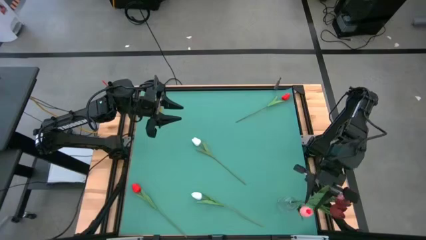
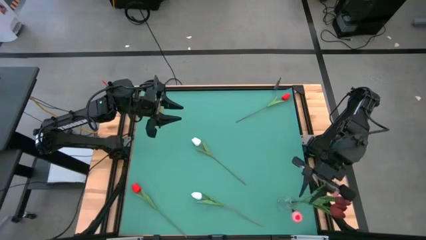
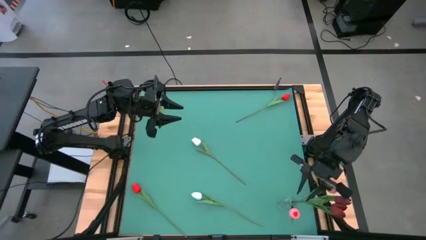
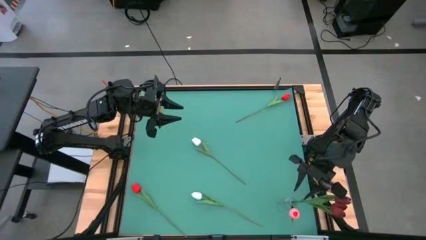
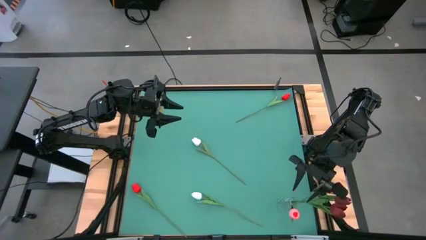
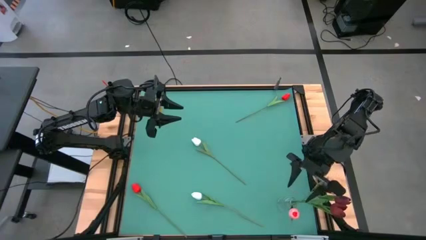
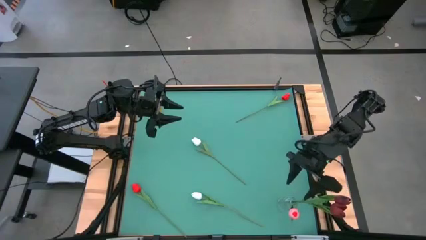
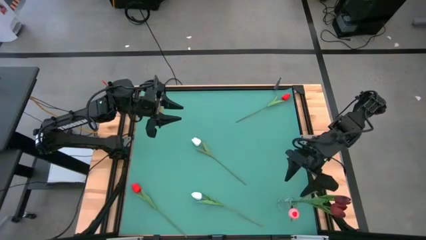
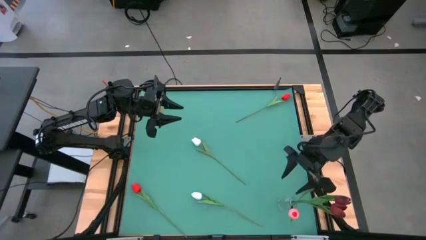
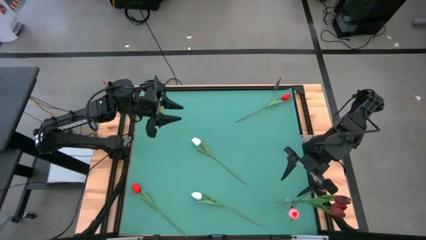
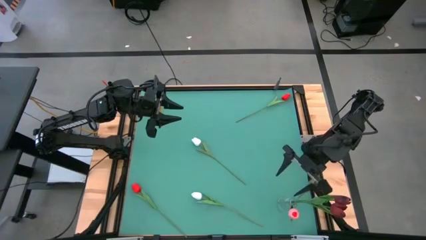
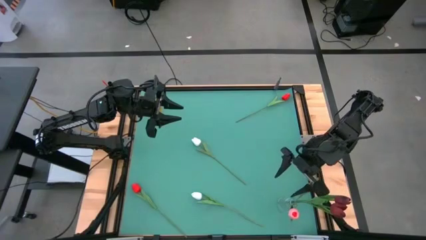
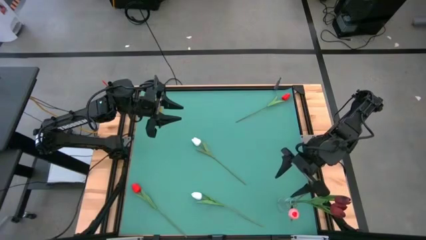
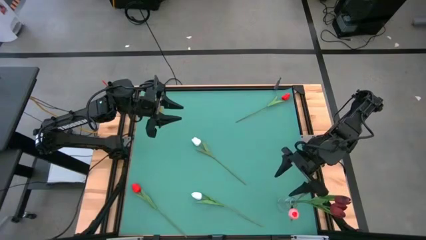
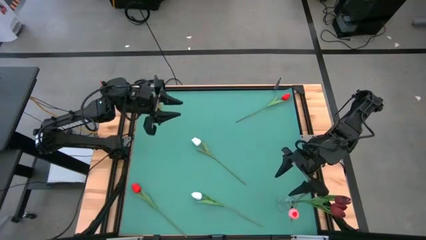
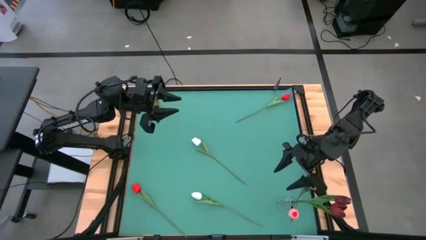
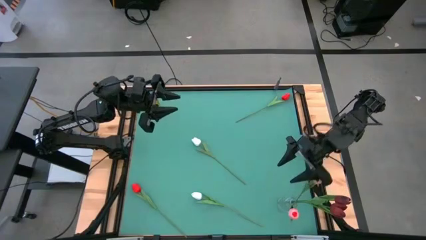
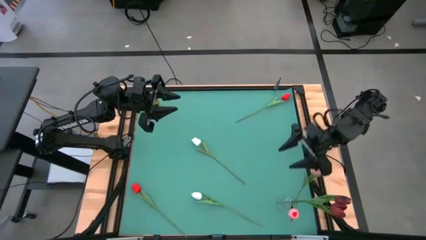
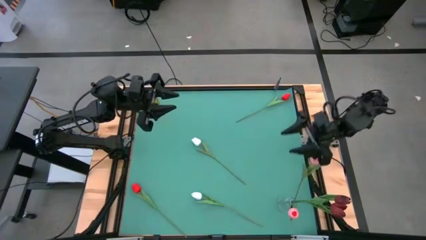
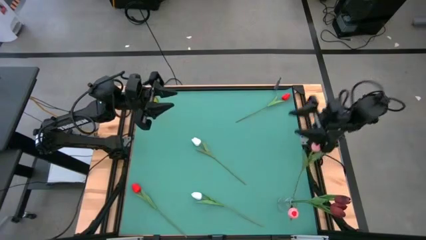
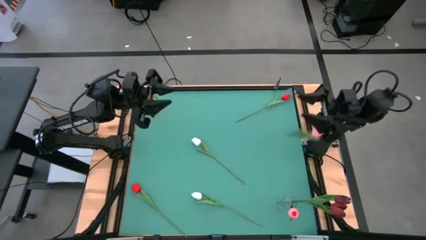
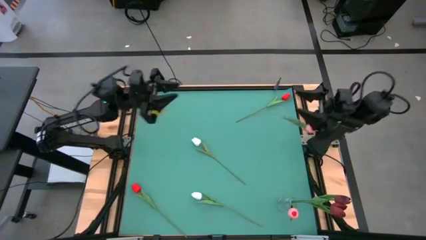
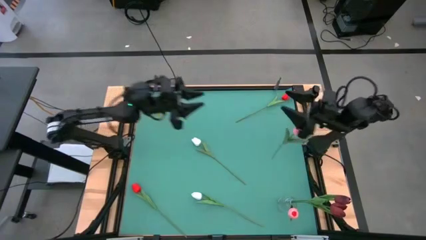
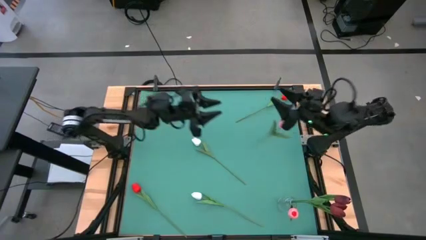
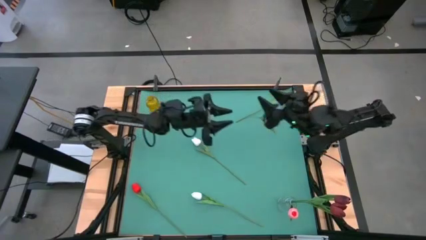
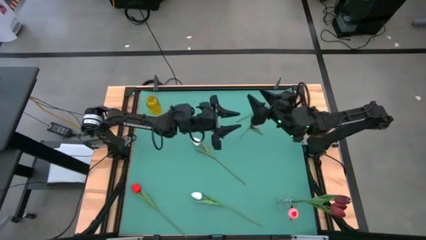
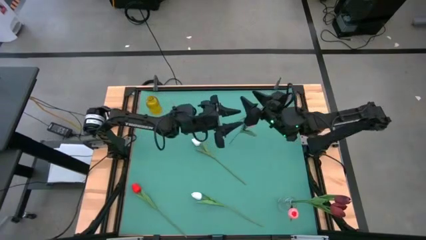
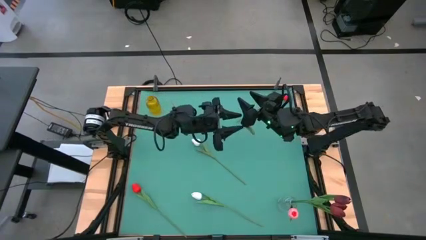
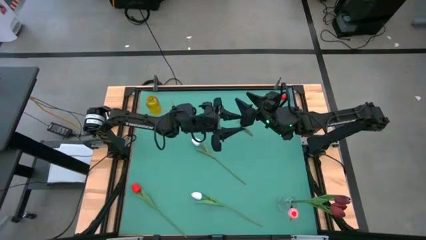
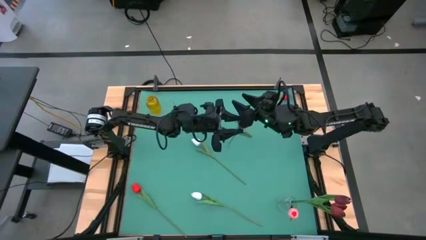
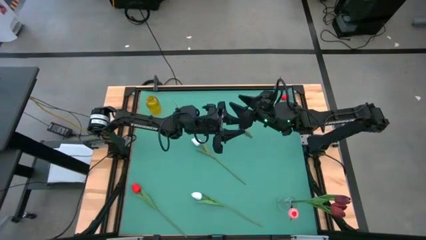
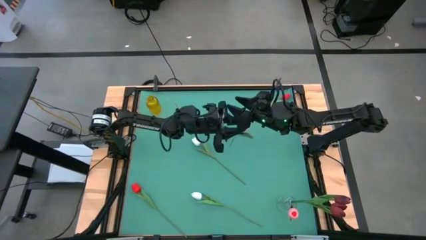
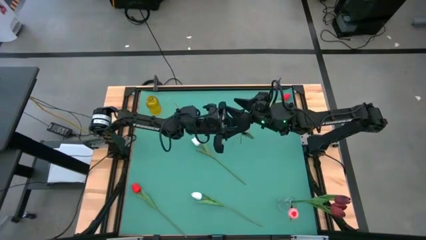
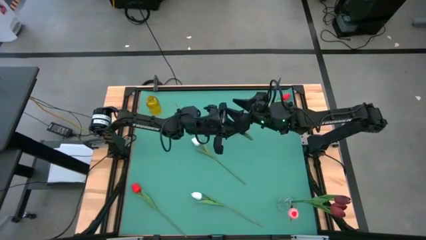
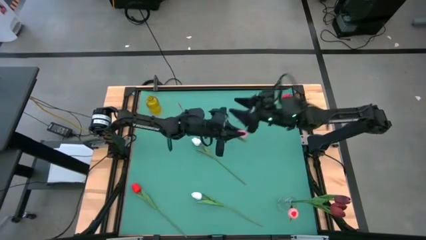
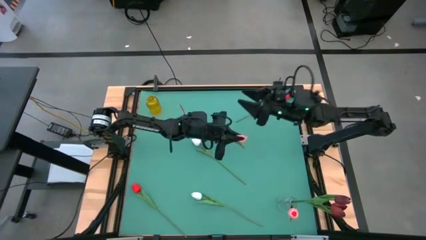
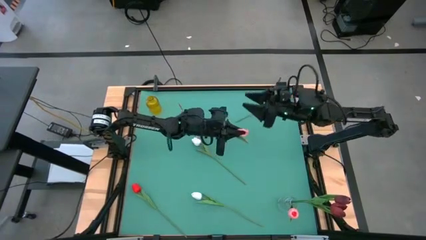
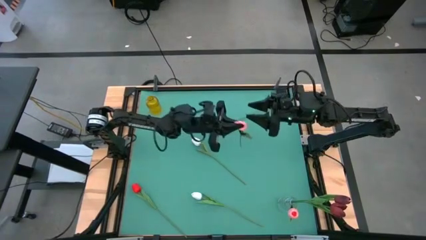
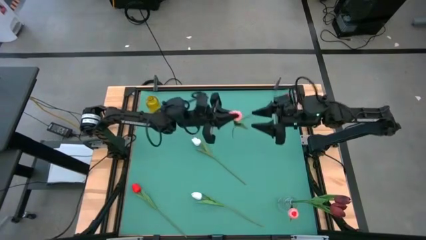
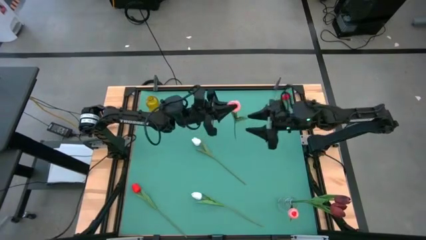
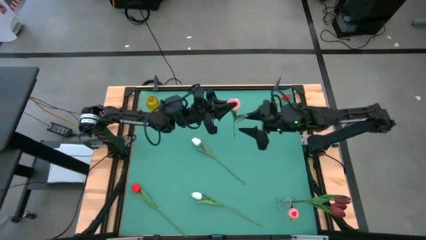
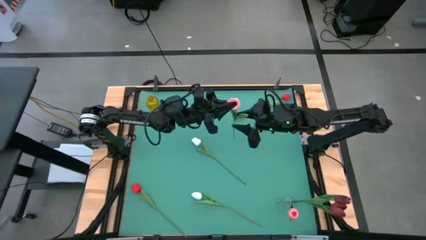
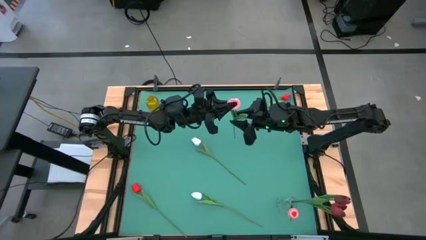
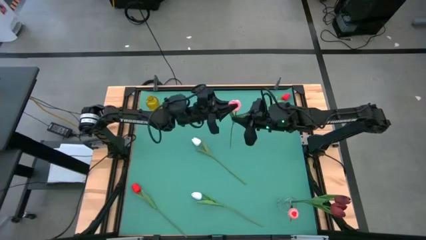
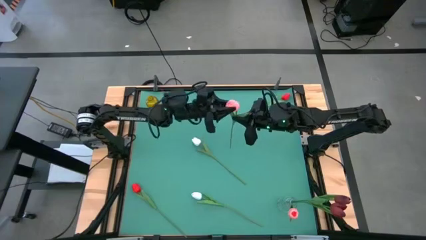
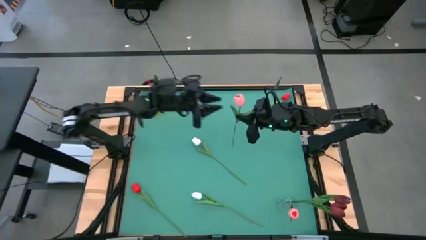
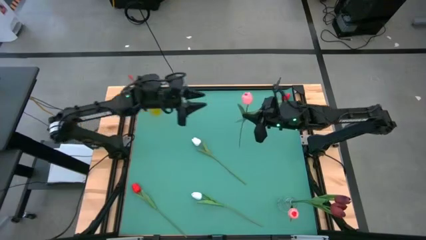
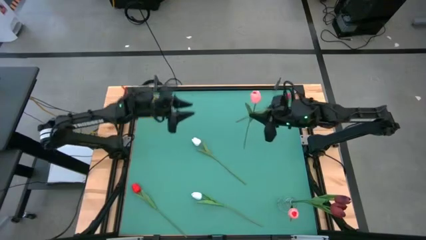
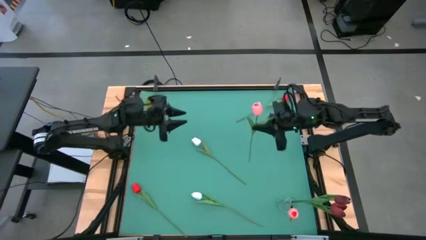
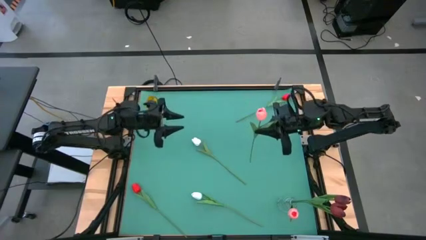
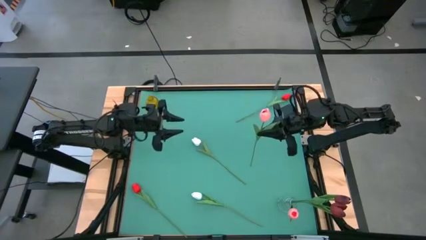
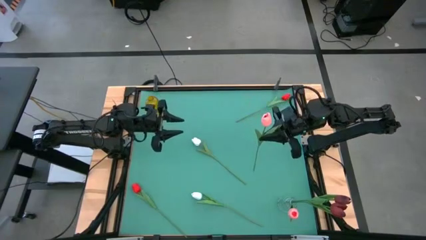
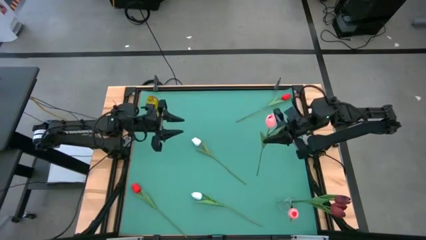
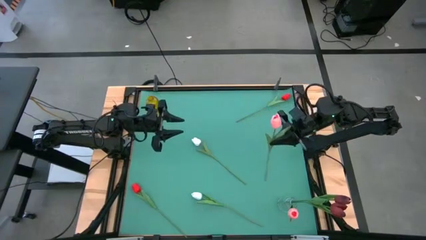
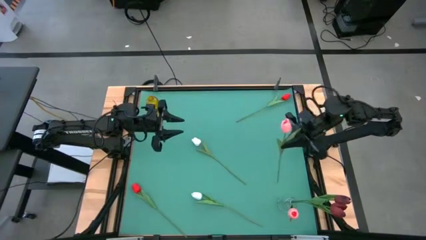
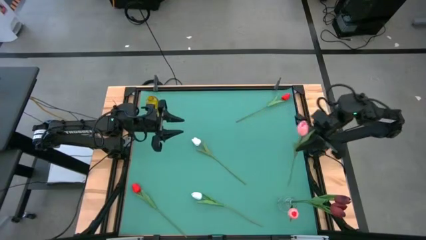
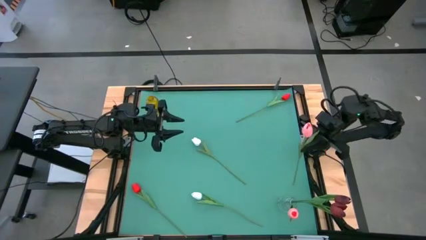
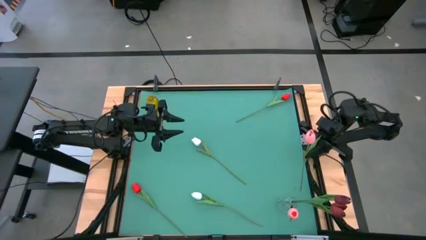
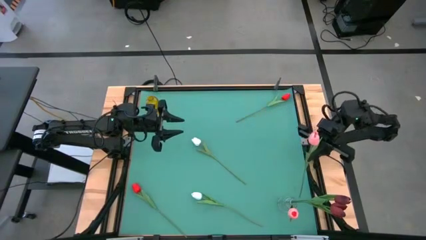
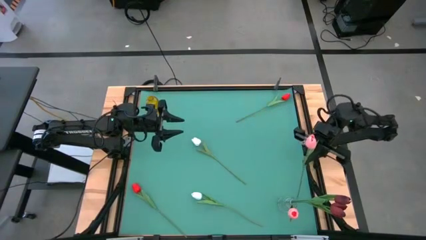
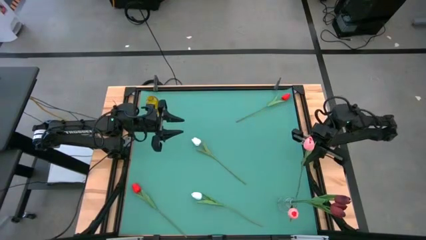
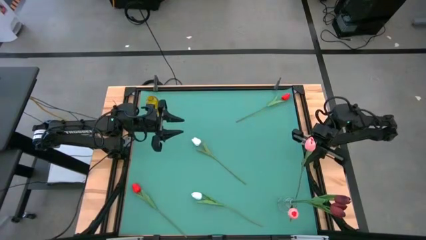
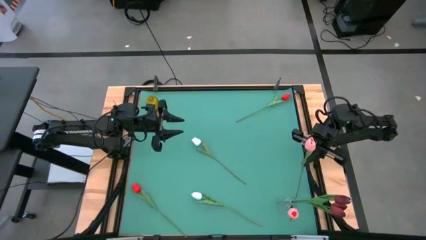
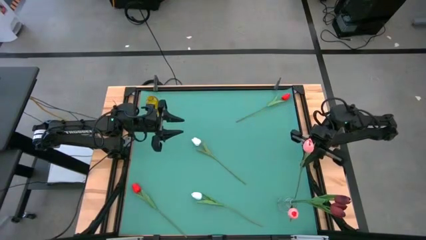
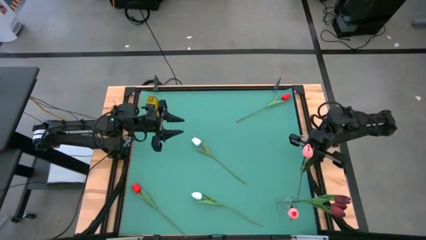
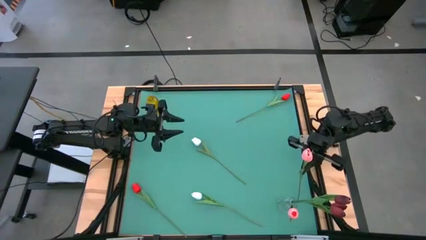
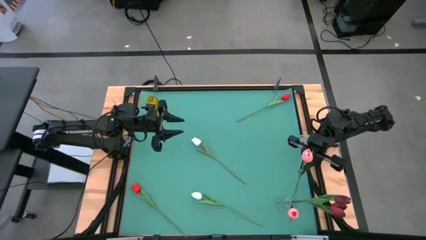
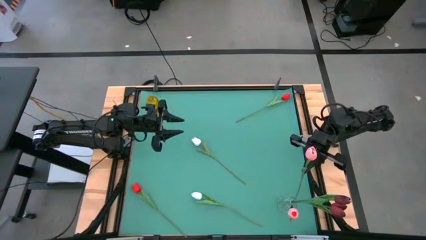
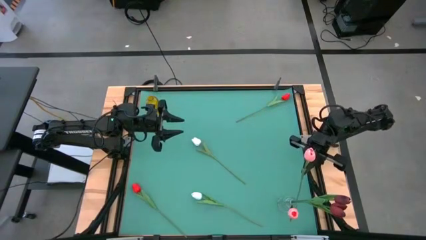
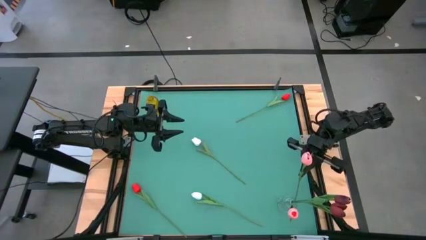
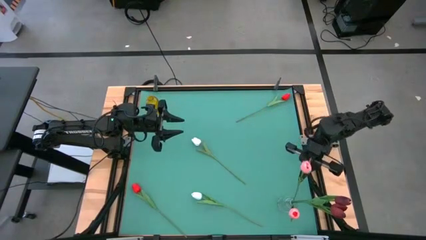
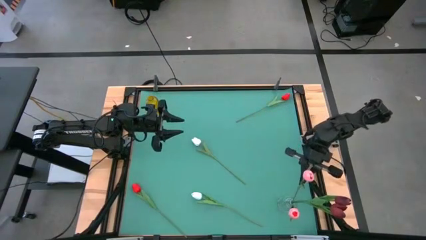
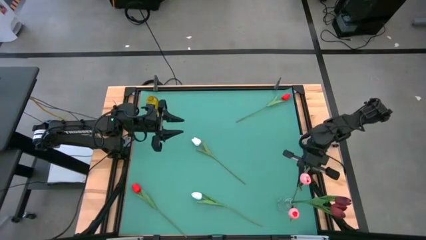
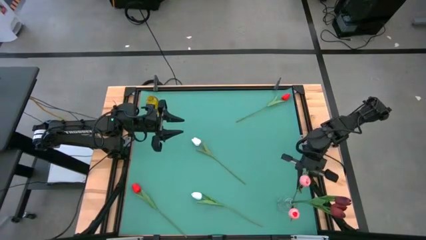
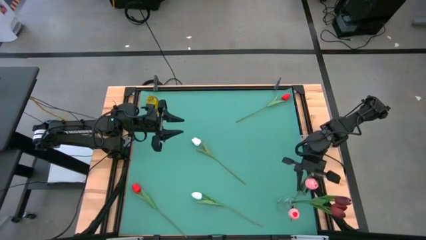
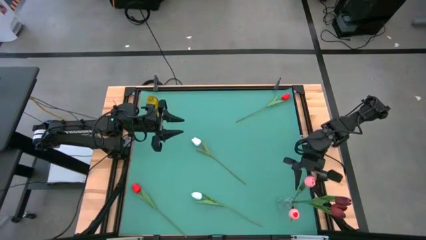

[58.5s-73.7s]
Task: Sort flowers into vase by color
Put the pink tulip into the transparent vase
